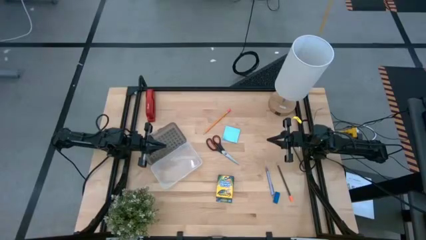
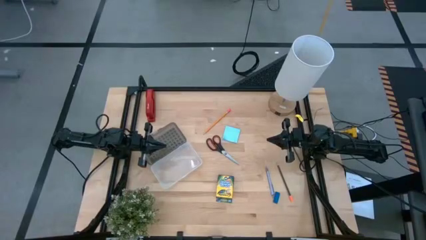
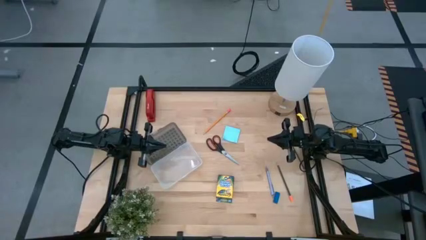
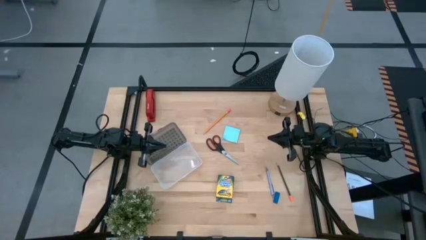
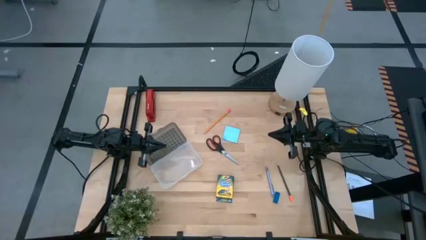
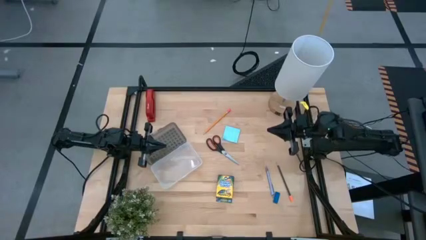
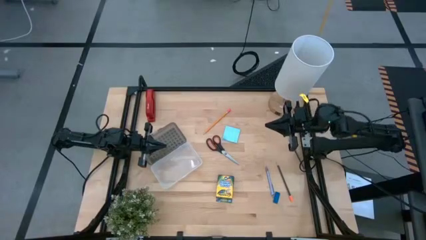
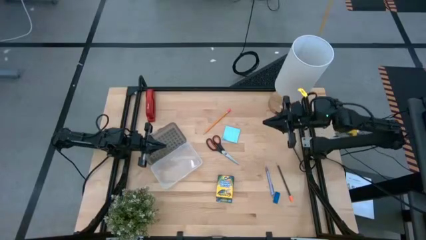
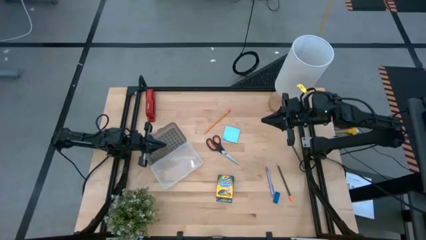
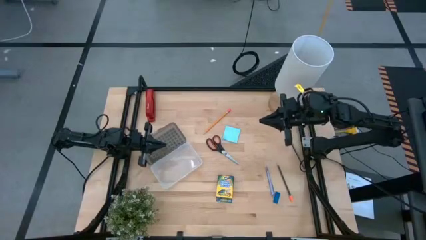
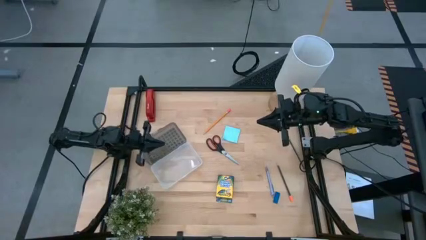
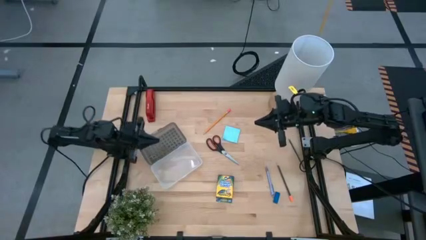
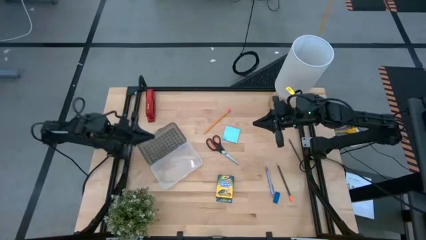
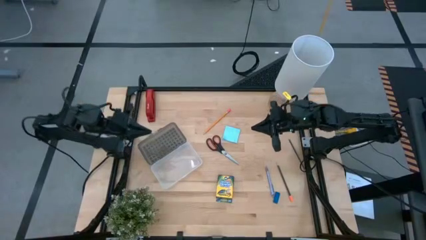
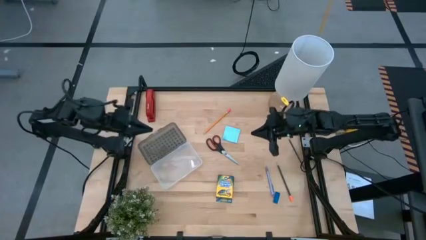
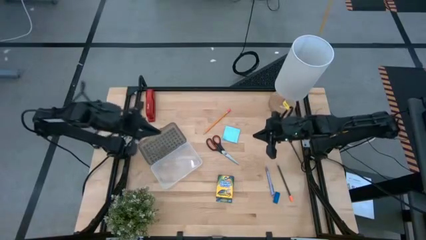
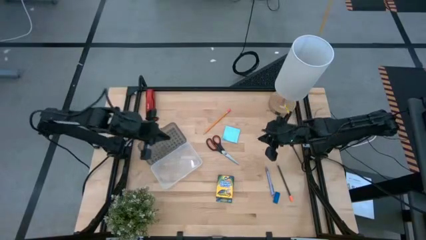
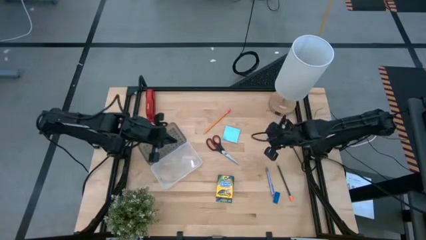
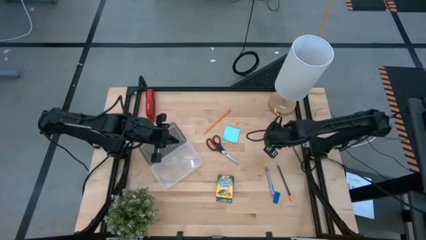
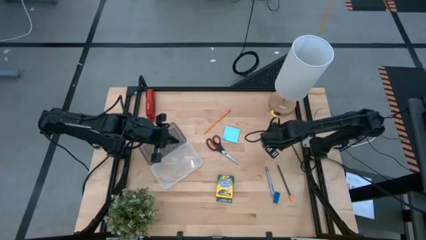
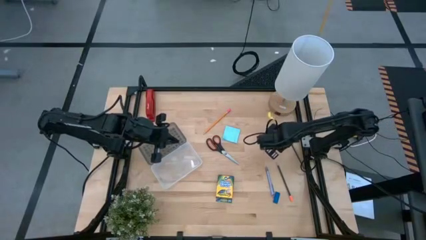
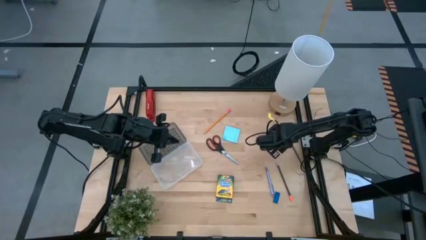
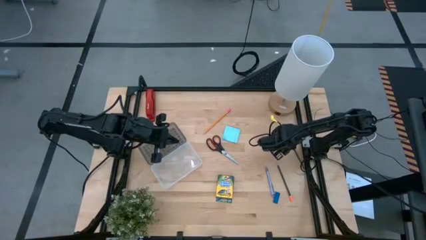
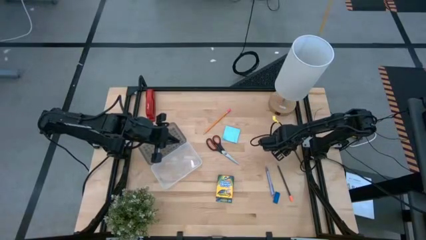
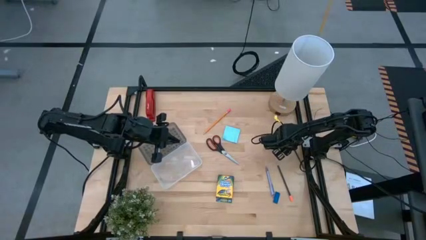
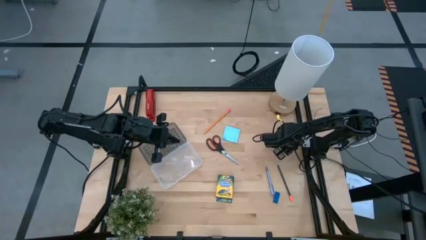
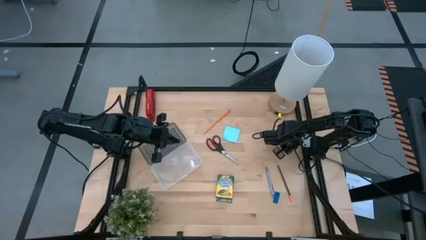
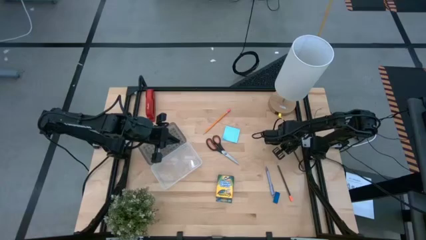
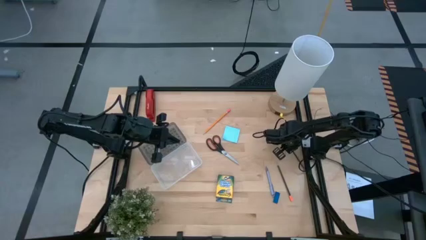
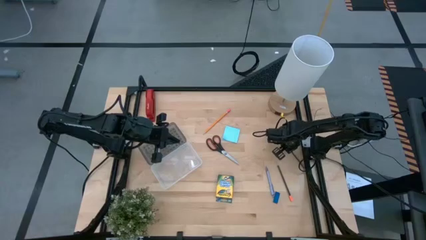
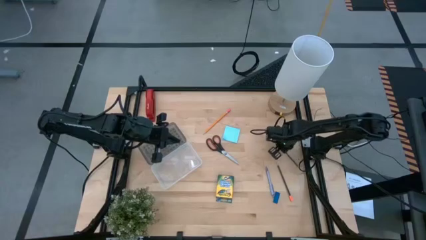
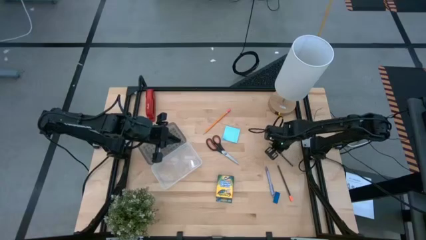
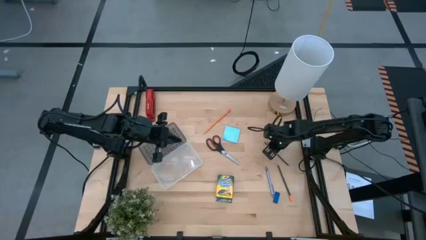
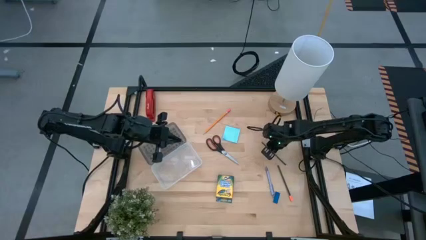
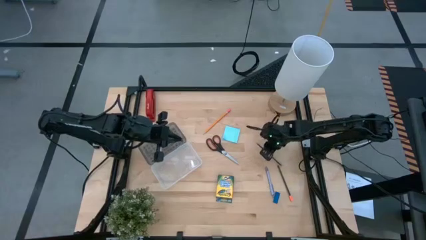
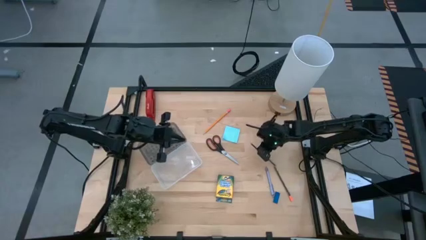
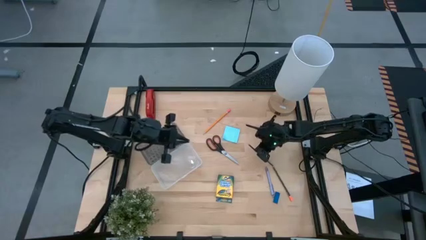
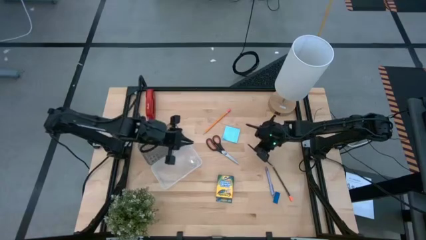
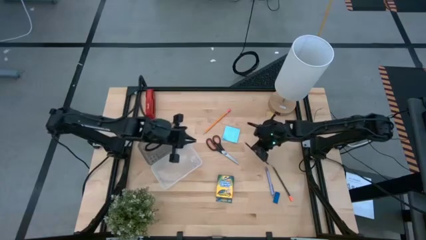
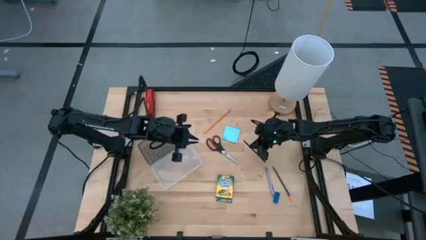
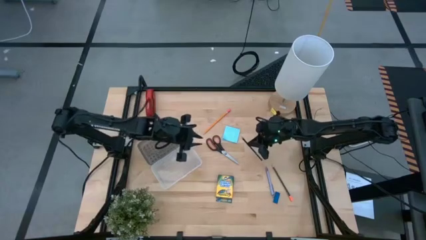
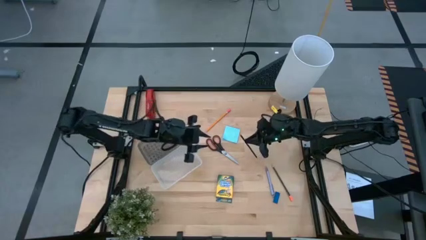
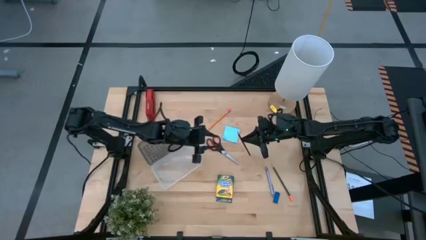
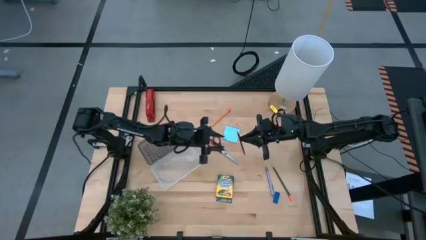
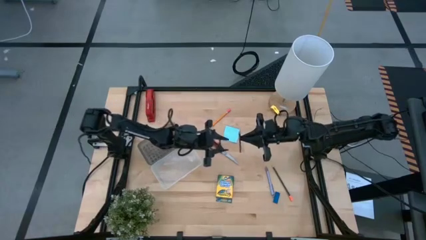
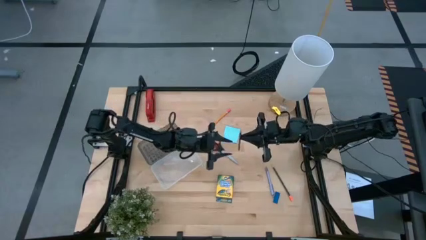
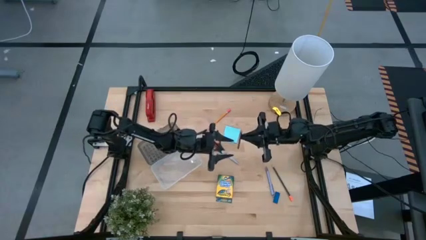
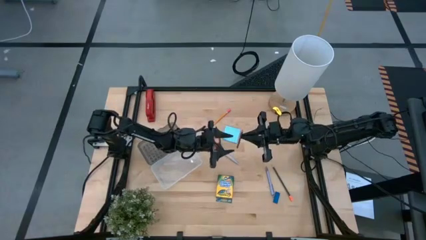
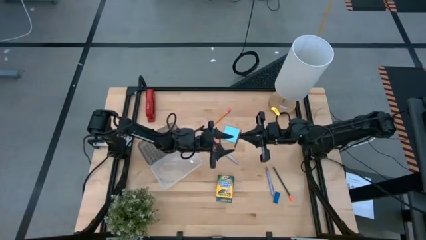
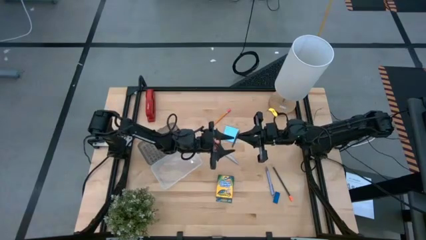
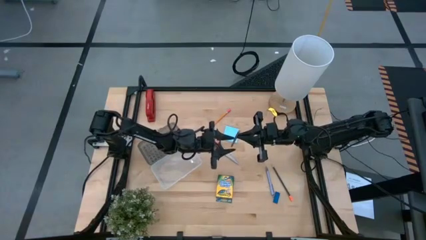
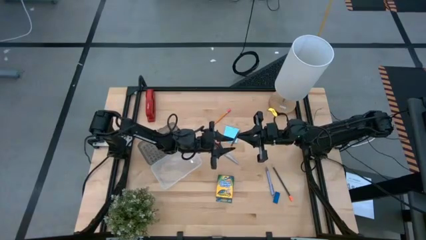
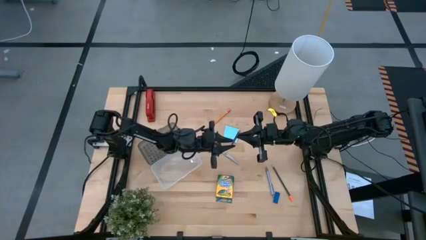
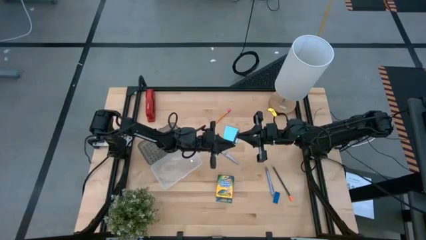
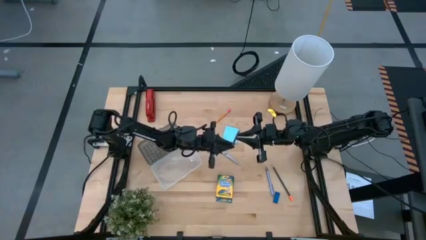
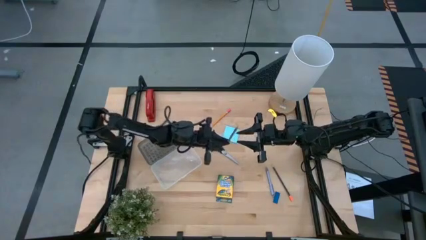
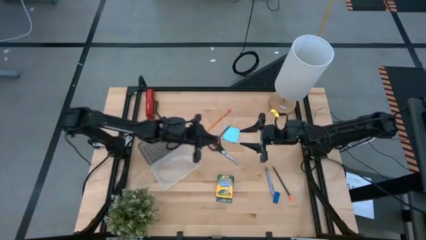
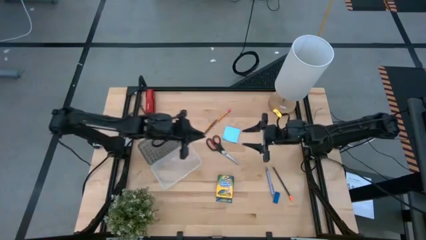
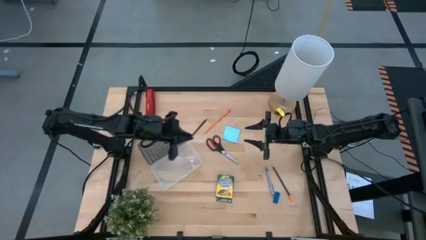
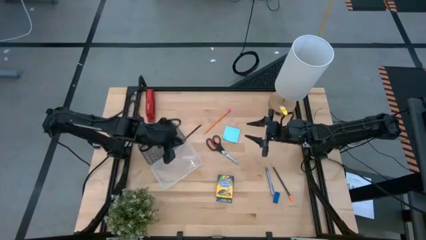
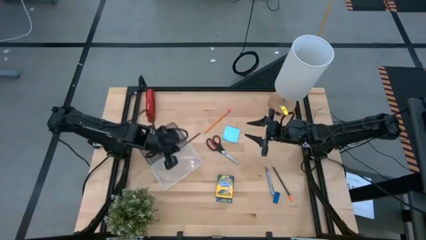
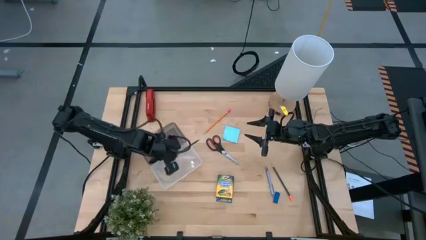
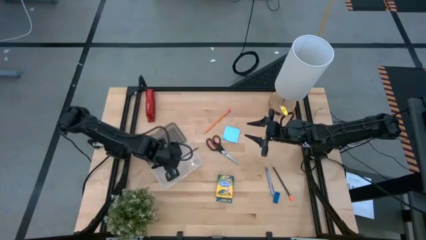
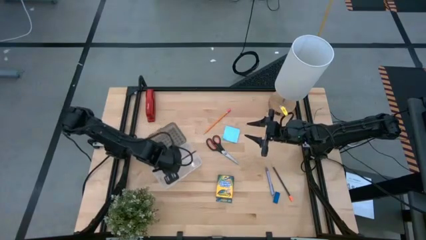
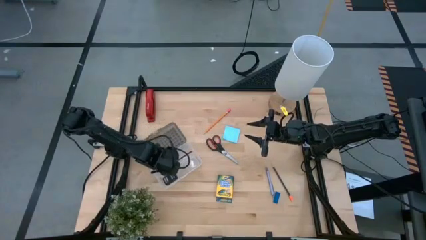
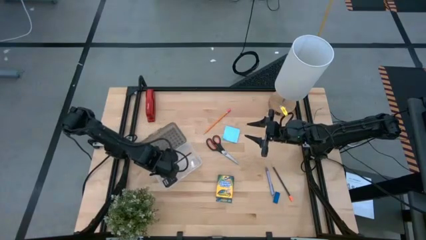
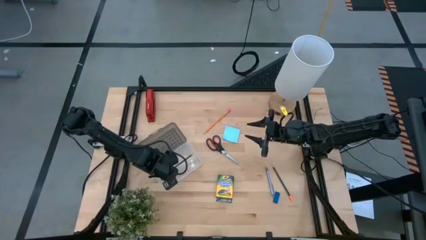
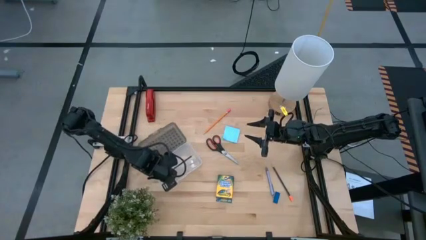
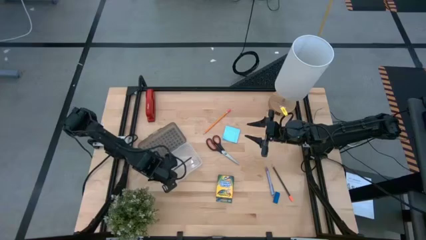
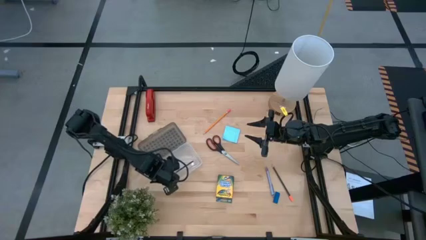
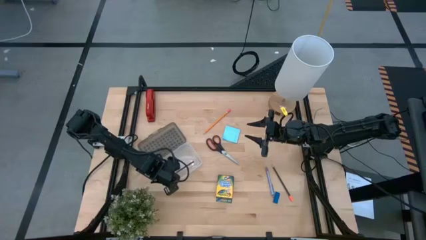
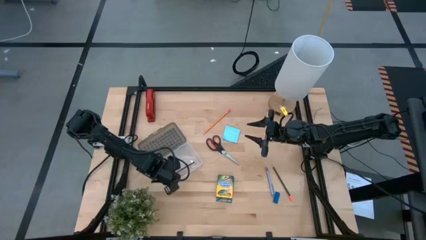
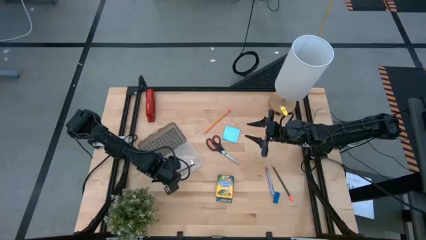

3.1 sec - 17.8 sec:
Task: Pack school essentials
Put the black pencil into the supply box
